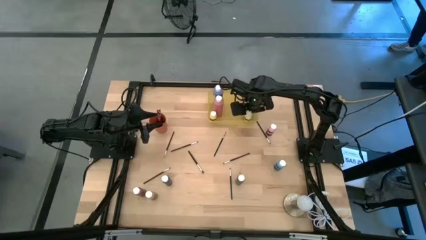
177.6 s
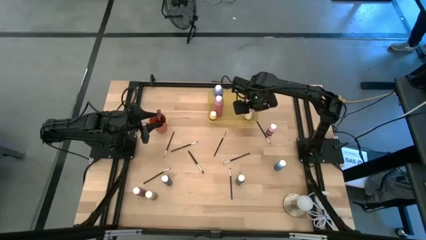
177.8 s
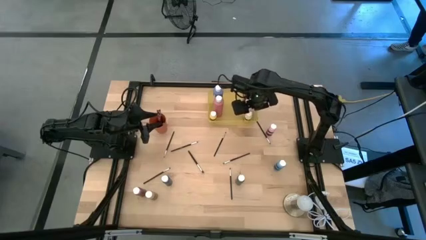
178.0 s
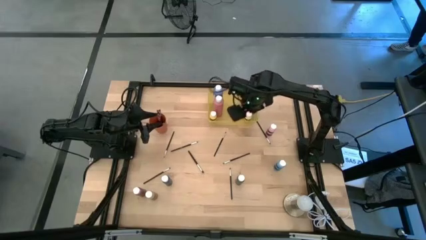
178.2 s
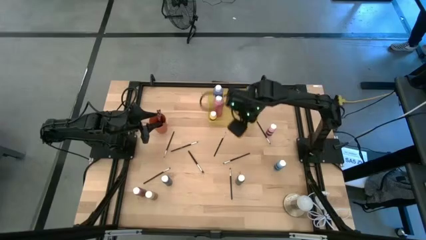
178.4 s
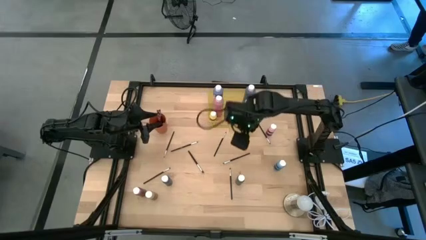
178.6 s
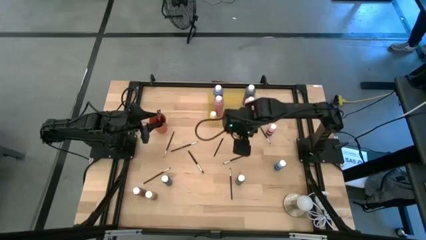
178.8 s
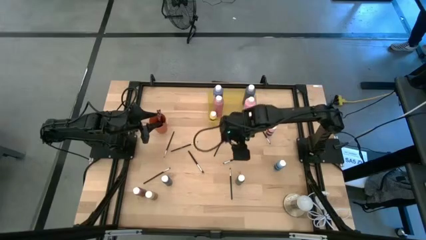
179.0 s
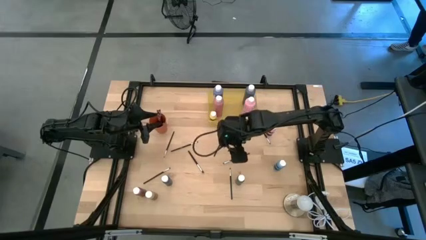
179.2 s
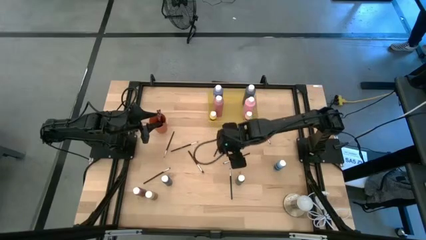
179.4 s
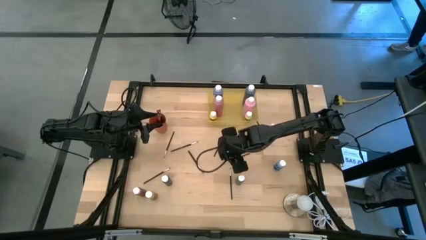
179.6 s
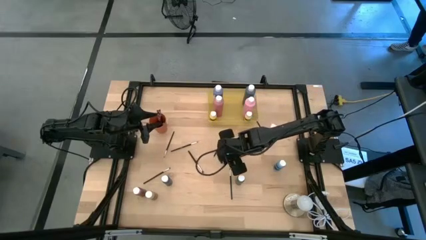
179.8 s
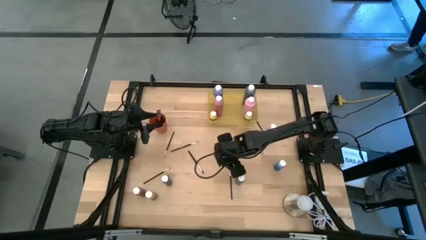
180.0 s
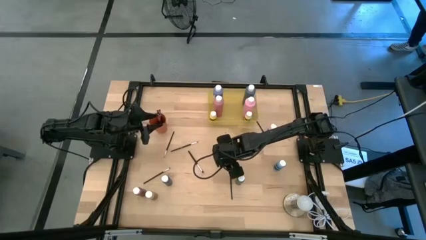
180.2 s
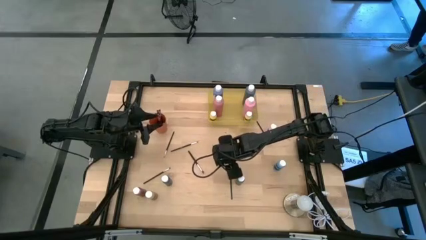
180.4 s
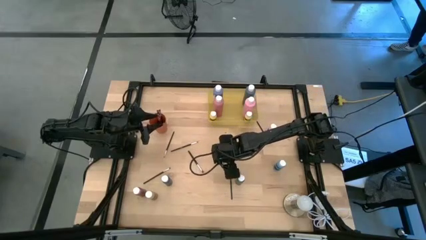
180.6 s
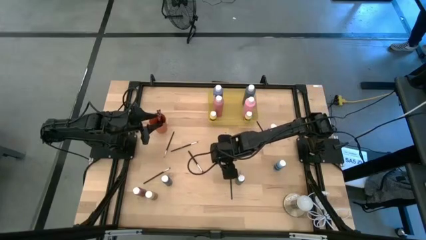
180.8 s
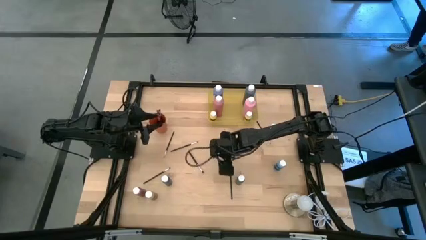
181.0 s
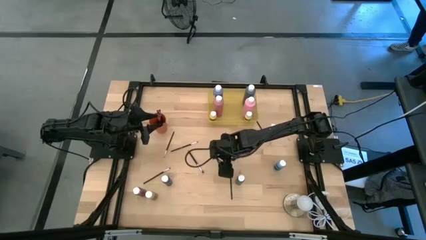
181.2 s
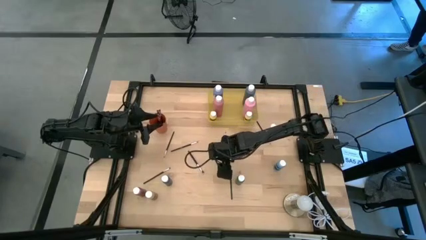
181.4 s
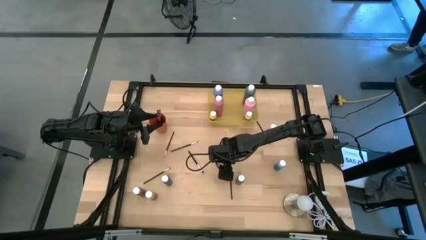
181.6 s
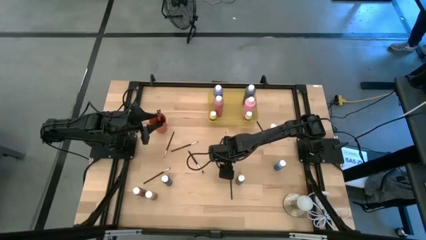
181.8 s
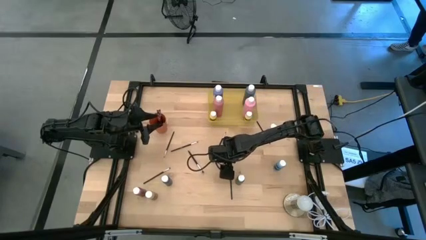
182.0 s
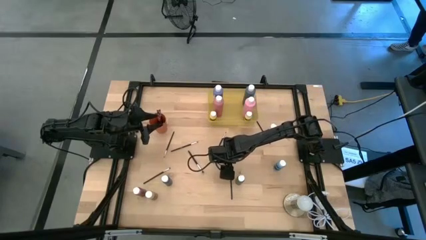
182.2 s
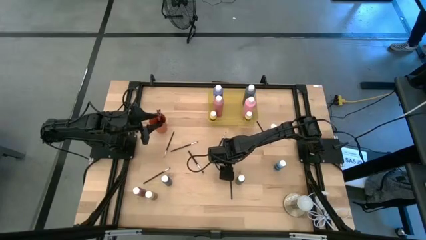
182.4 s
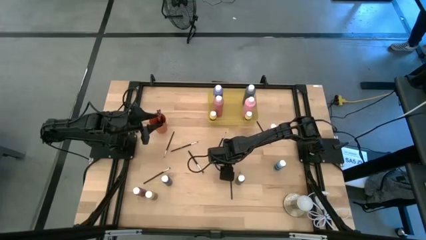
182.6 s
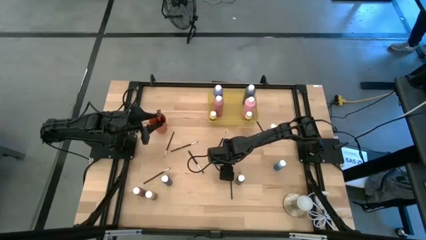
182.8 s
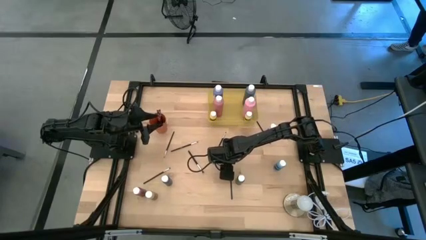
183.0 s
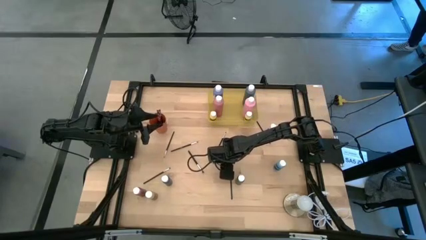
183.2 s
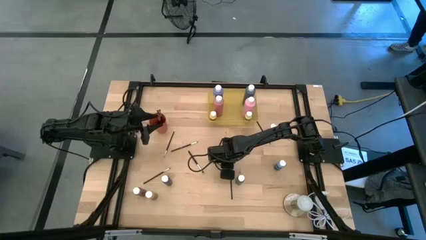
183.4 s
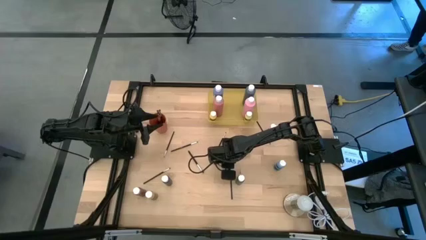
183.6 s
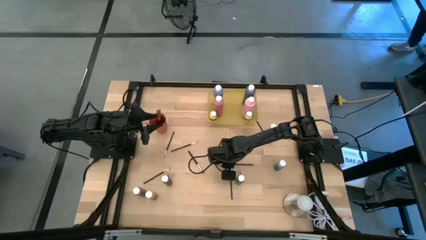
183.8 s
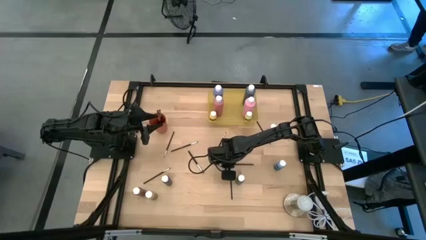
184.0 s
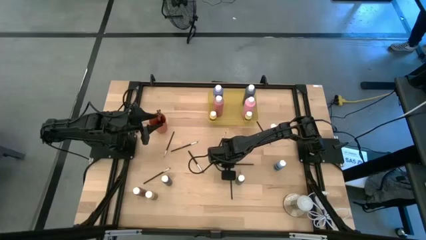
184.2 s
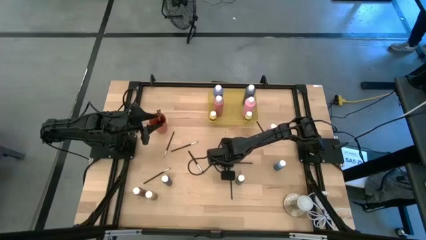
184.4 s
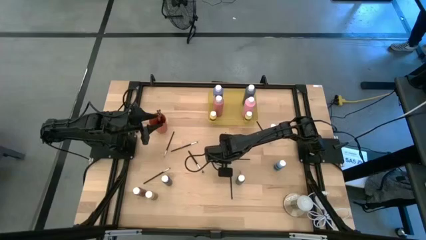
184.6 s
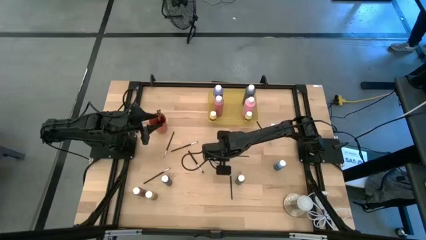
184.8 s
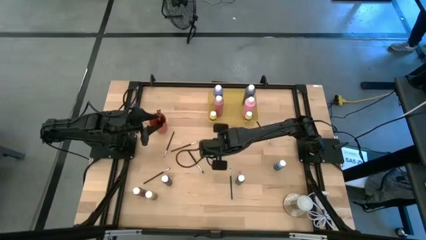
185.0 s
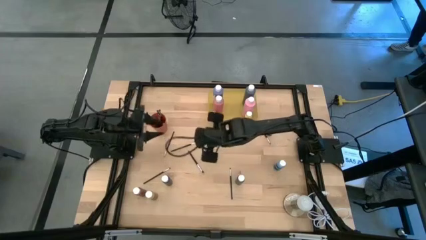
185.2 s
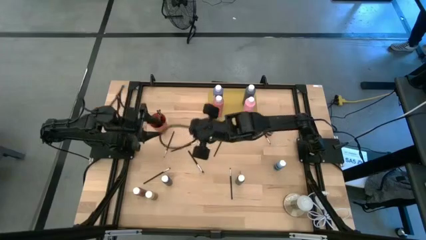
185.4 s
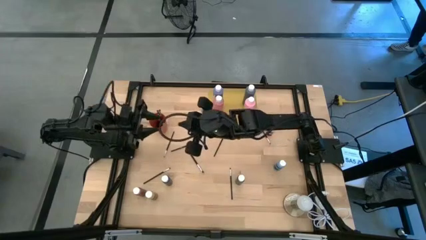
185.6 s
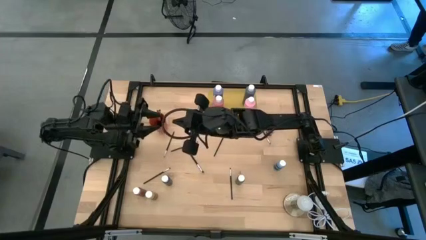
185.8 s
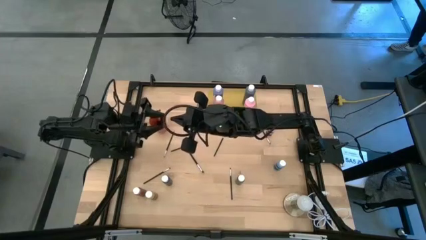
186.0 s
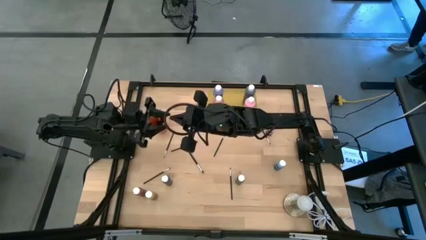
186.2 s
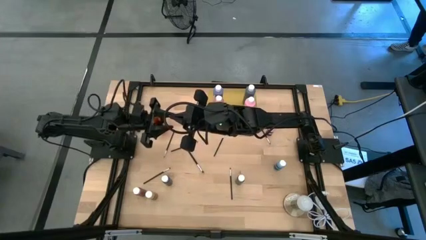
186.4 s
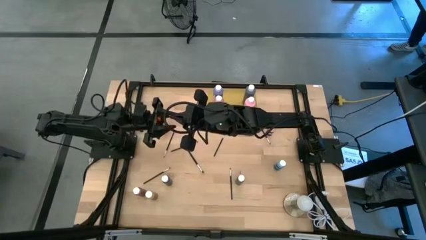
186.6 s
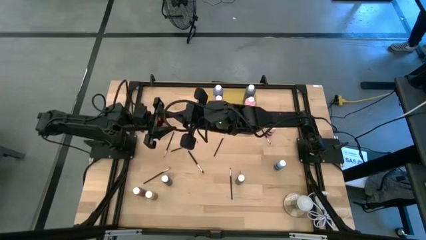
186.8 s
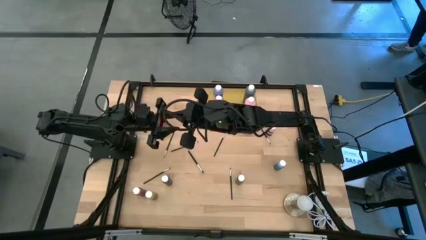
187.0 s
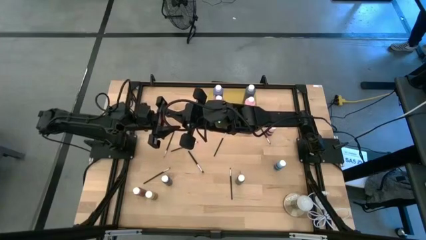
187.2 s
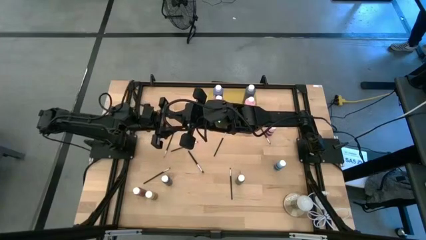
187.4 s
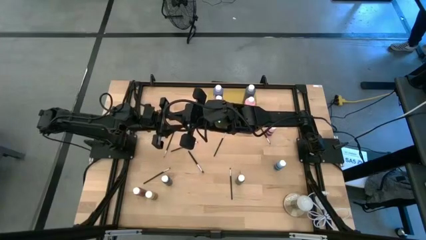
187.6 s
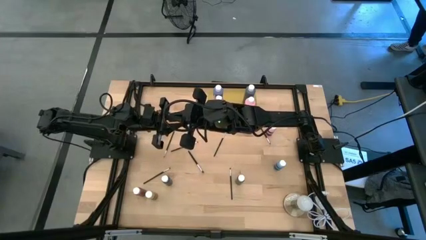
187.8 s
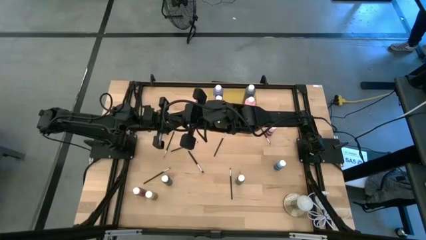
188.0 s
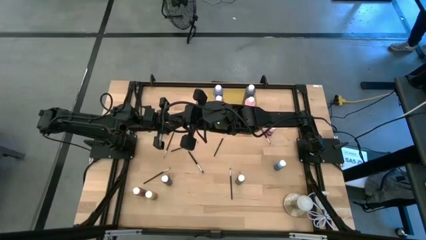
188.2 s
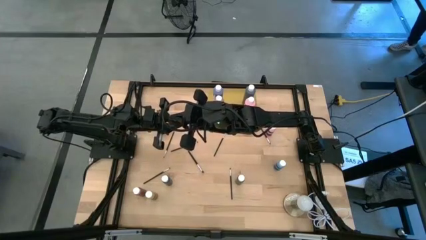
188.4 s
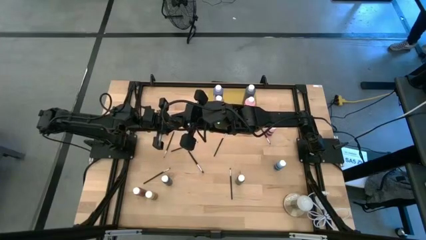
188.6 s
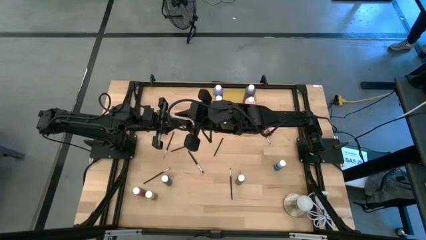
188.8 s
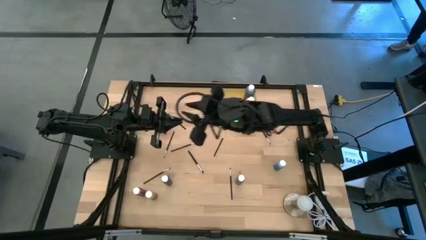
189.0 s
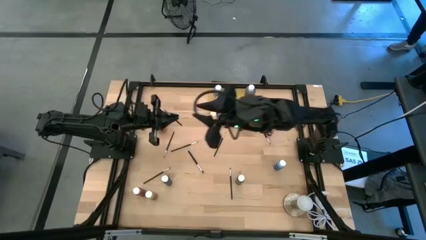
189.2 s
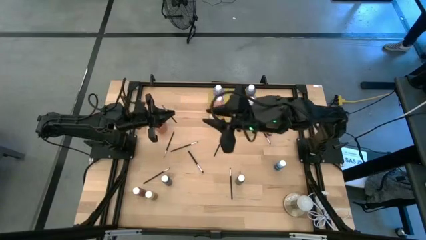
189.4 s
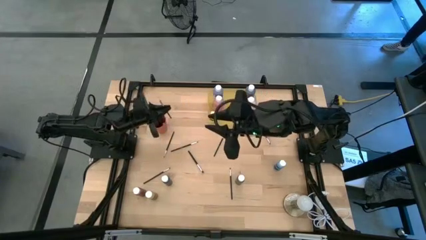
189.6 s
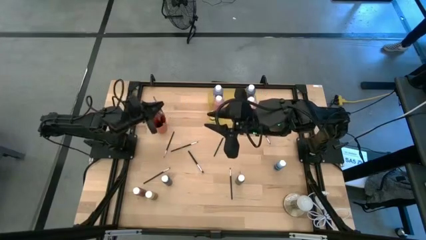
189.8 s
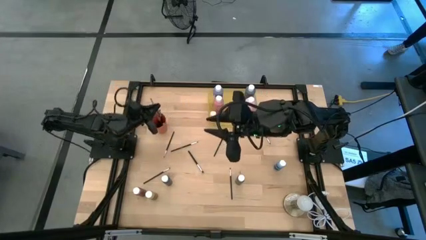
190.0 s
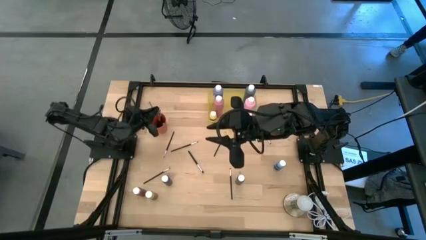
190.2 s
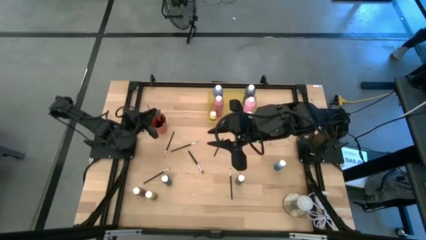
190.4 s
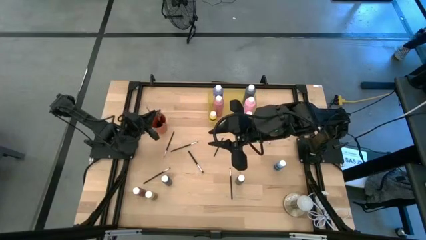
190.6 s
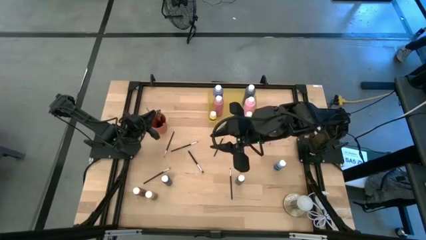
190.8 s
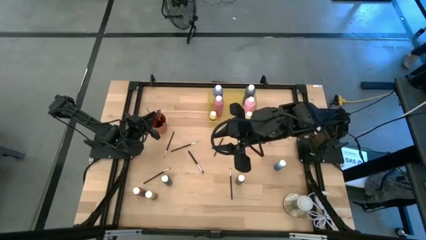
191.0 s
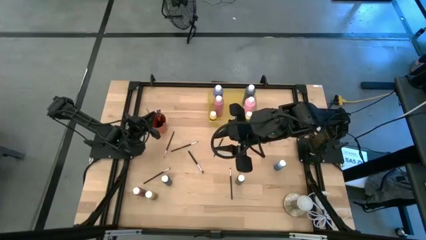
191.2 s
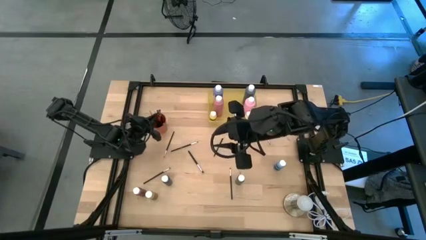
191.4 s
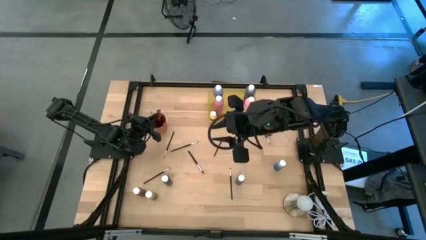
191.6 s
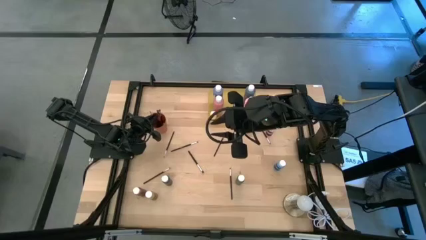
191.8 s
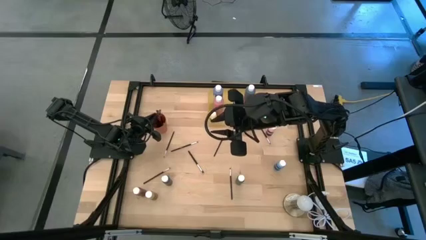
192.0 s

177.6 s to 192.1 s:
Task: Pick & Place Paint Supplies
Put the silver paint brush into the orange cup

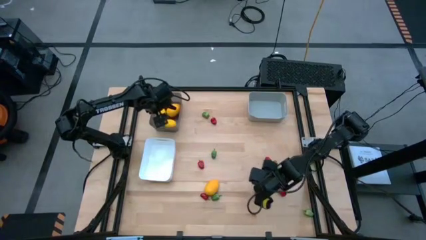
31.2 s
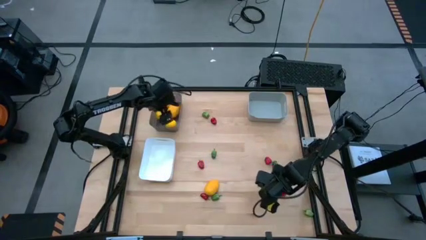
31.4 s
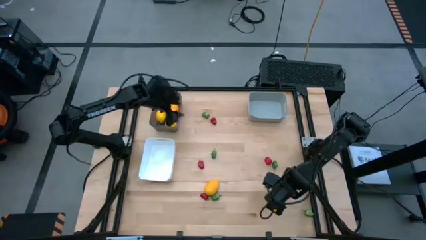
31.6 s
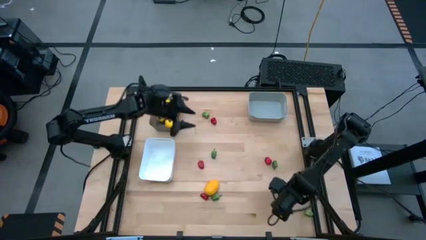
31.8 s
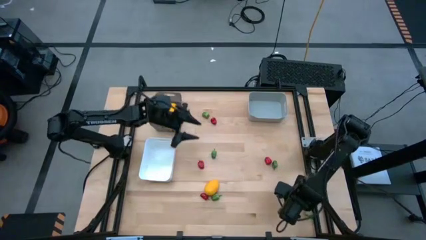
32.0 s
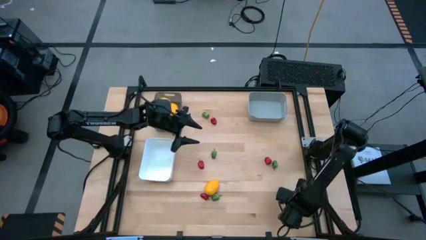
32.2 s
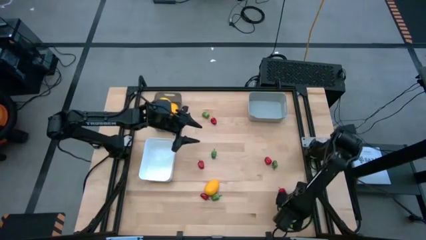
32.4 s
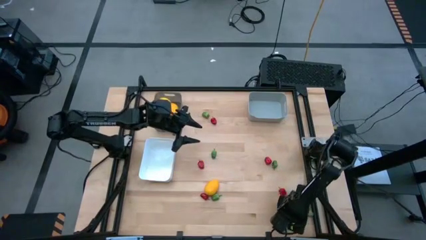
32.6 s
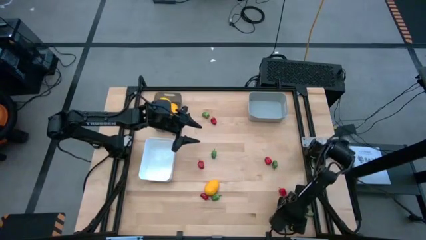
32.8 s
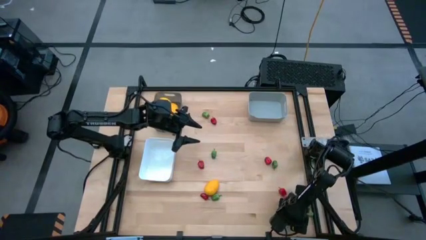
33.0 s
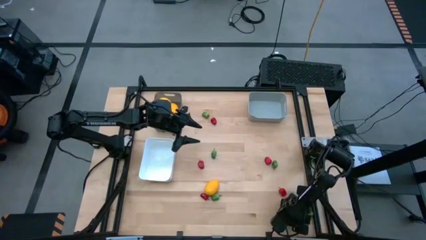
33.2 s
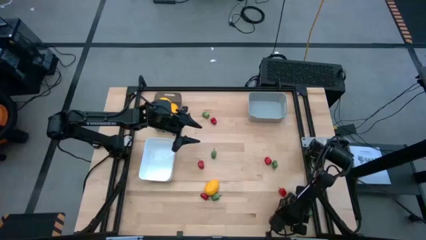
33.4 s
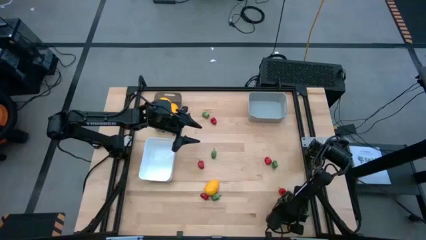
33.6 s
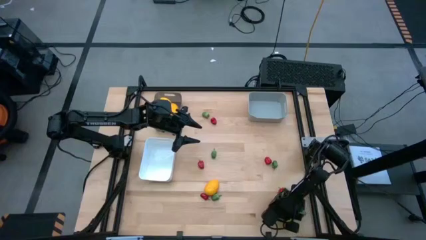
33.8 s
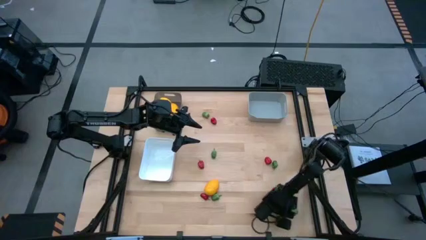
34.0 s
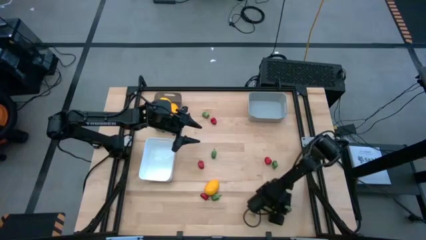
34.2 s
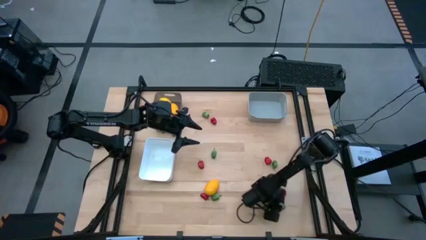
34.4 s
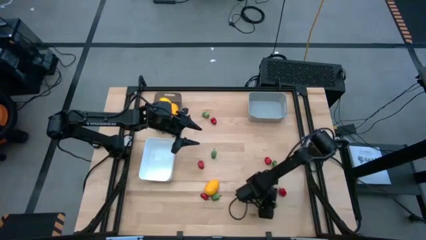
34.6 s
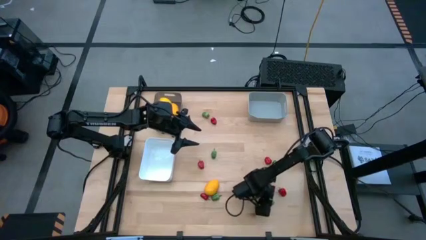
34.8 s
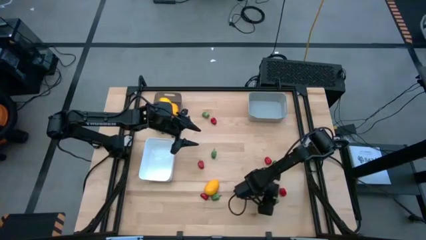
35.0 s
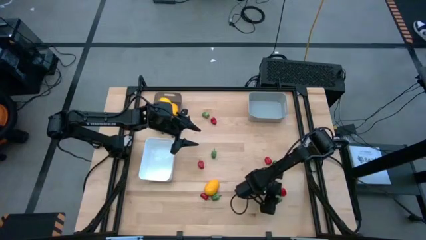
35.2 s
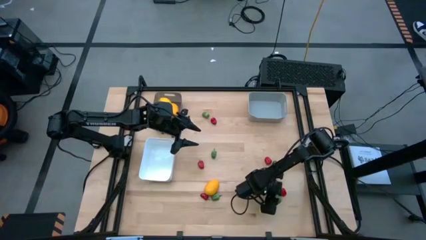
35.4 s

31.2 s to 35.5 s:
Task: Sort produce into baskets
Move the bottom right green chili pepper to the bottom right of the table
